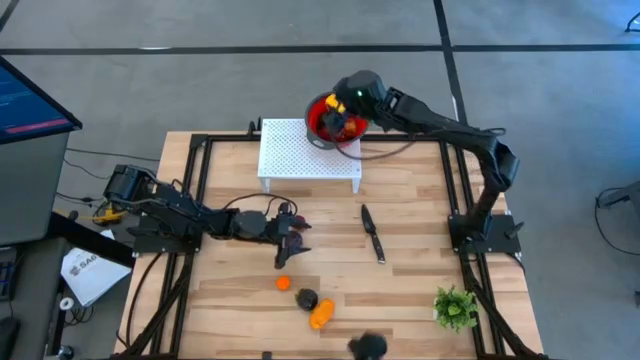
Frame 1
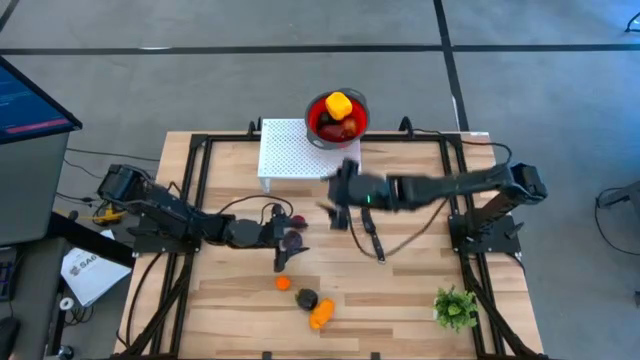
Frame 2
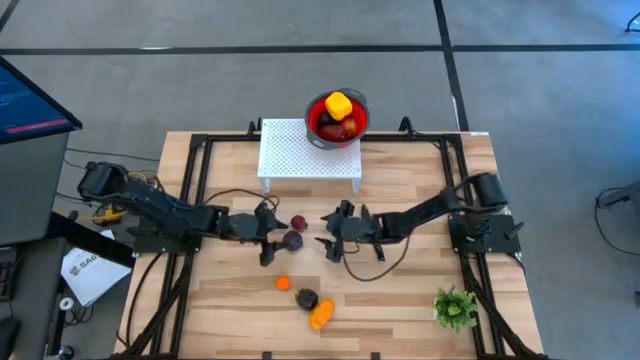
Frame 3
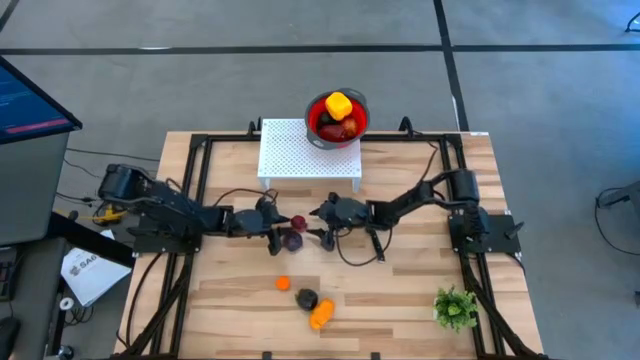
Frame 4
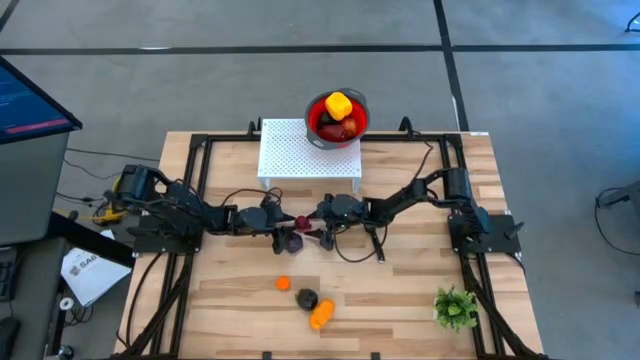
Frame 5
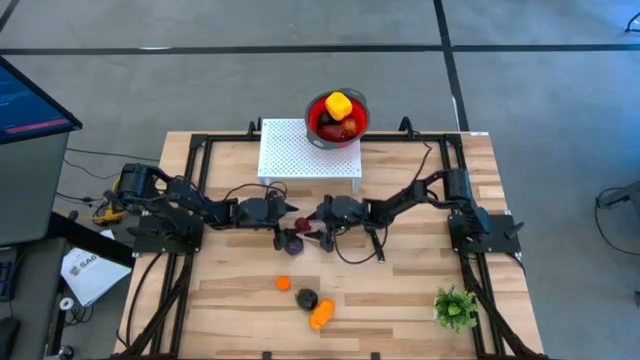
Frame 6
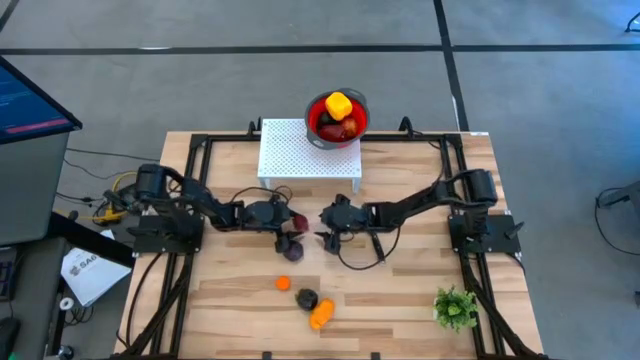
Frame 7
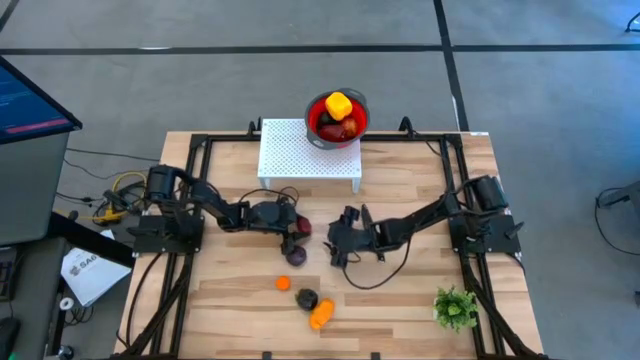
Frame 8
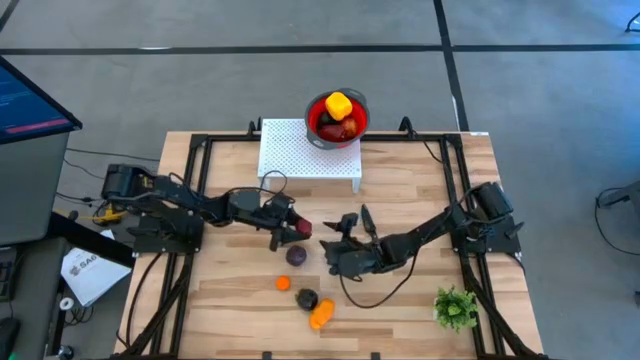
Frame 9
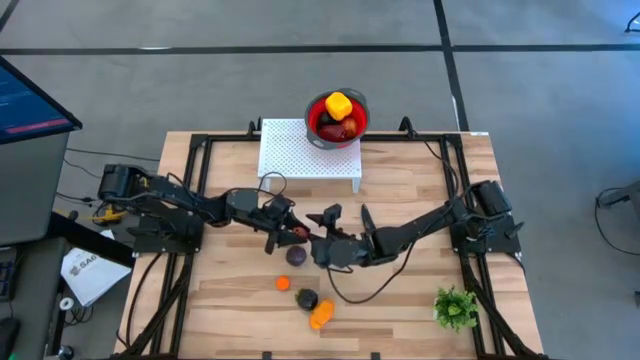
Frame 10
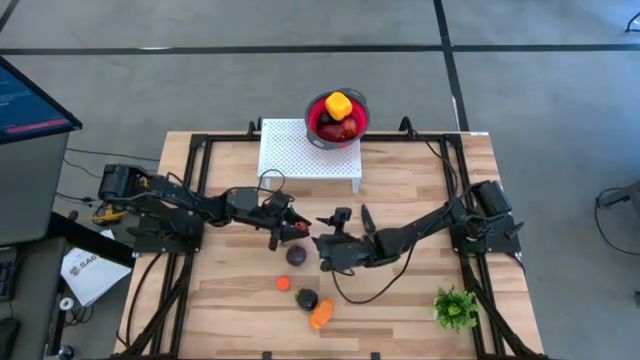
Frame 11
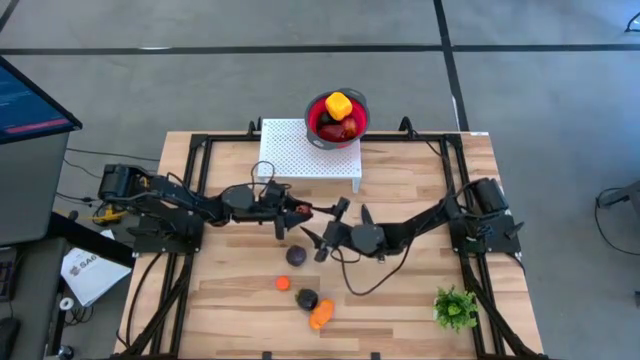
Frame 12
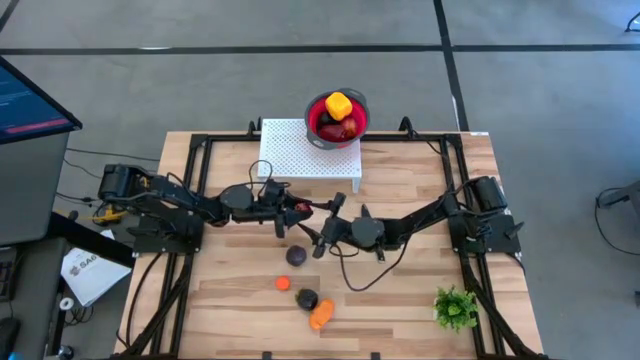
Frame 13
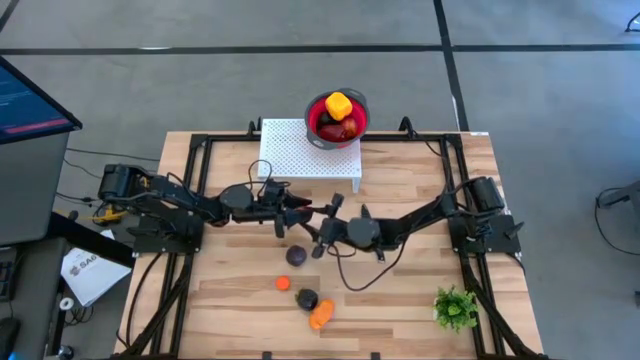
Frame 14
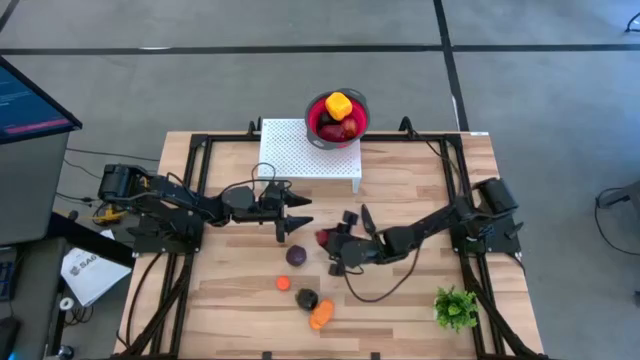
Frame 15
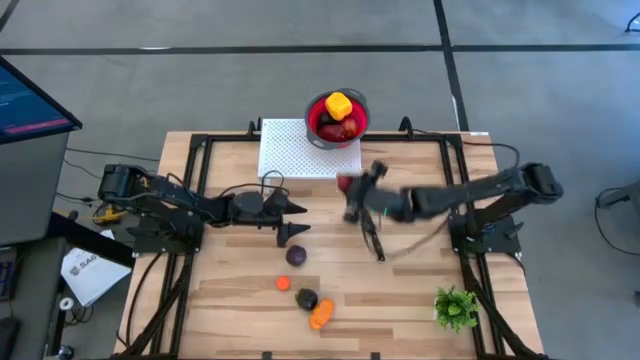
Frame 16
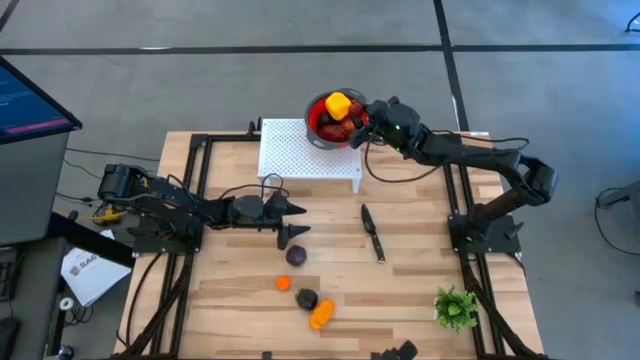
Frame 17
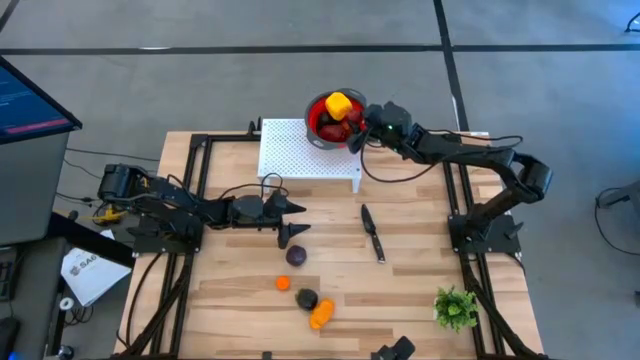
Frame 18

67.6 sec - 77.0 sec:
Task: Pick & Place Fruit
Put the red pomegranate into the strainer bowl on the shelf

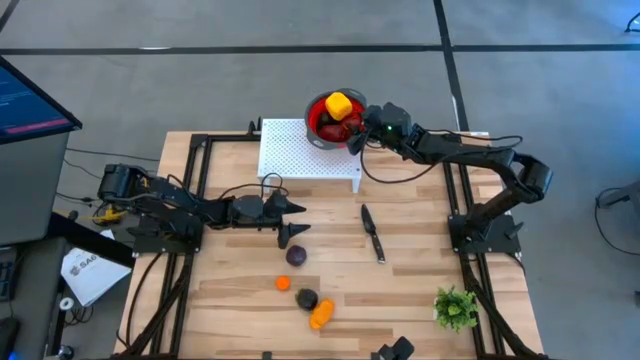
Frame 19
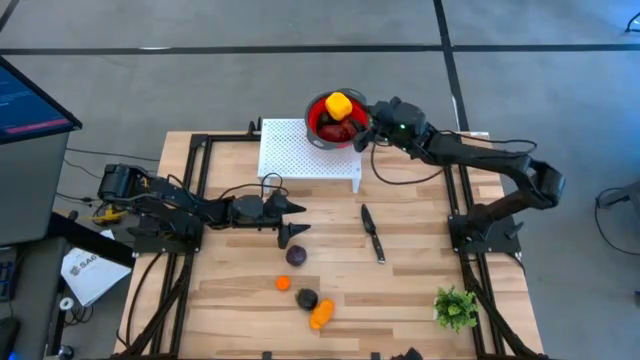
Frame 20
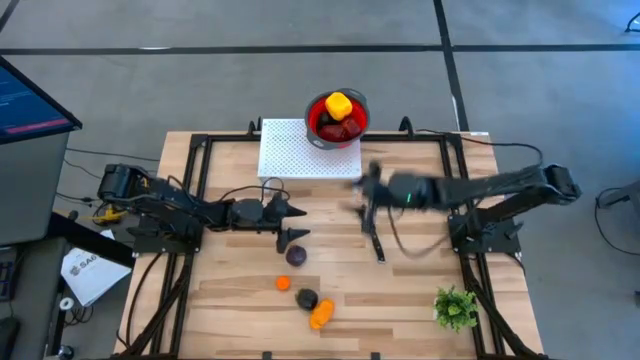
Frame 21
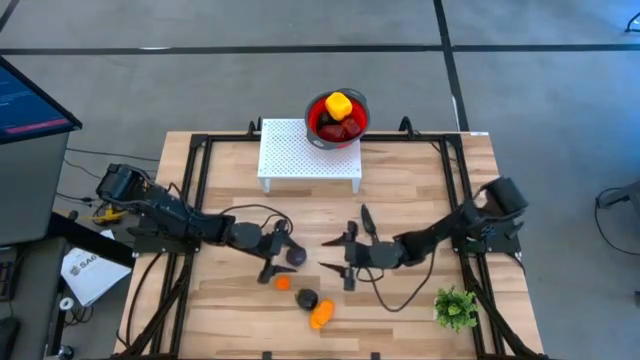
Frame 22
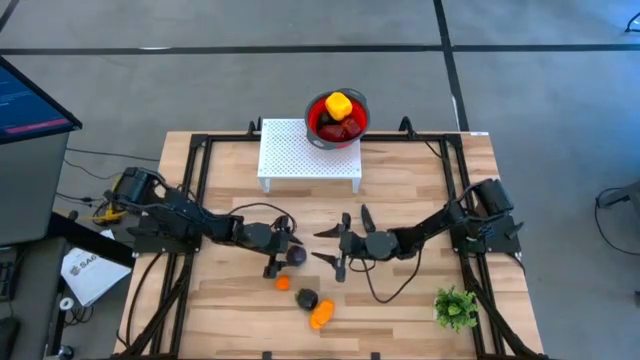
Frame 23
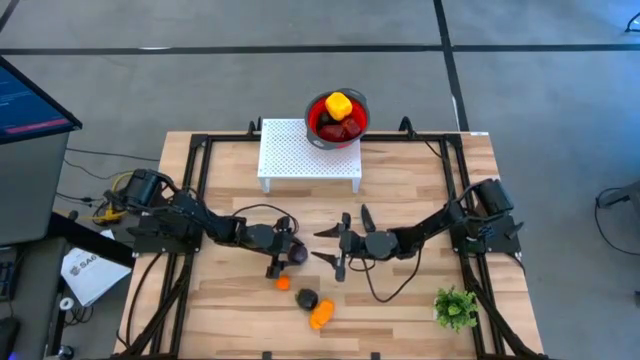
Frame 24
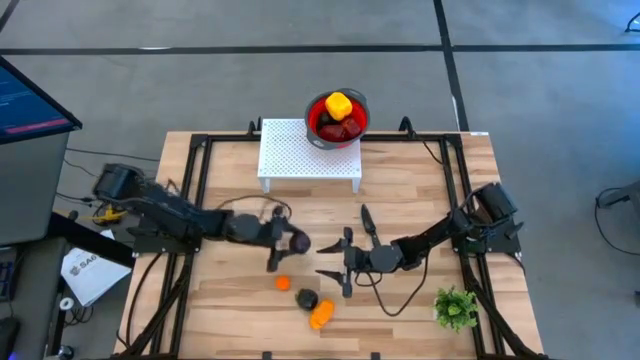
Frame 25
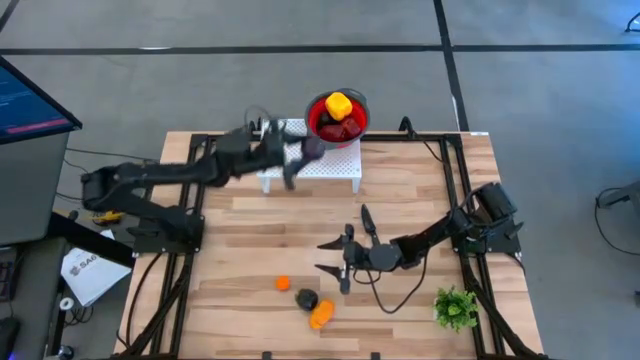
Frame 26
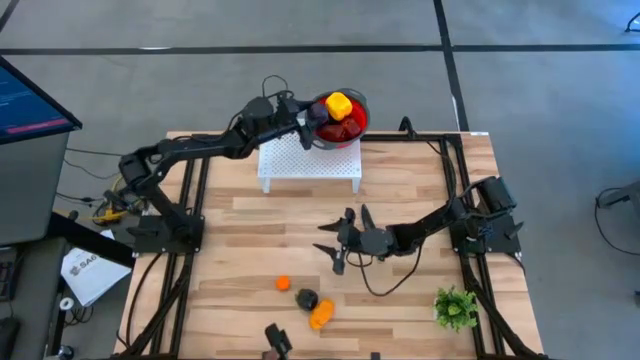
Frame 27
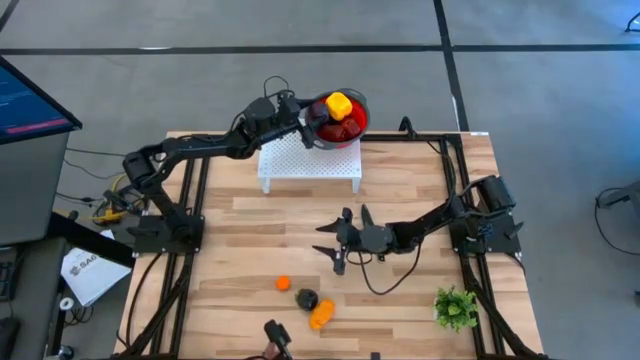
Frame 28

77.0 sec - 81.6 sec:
Put the black plum into the strainer bowl on the shelf

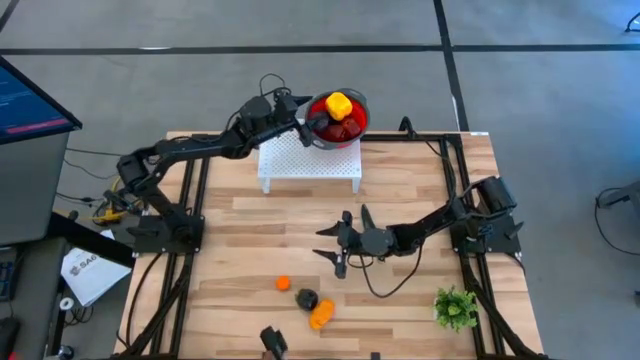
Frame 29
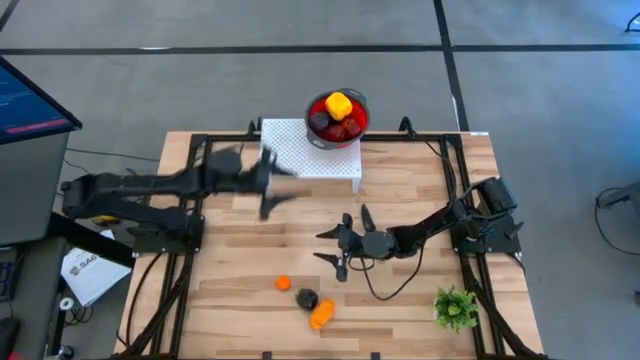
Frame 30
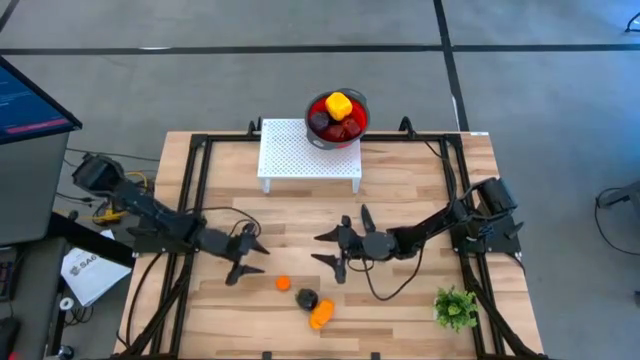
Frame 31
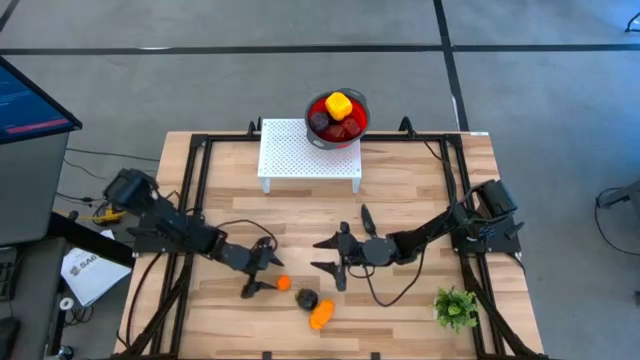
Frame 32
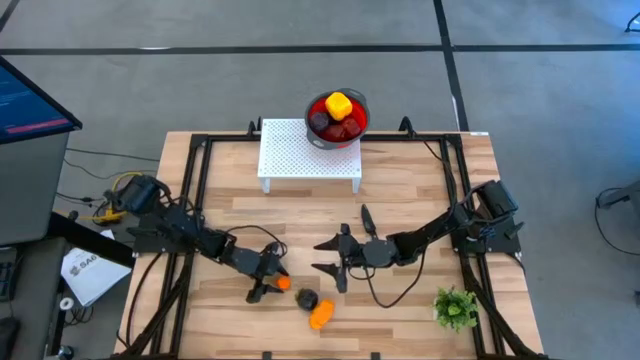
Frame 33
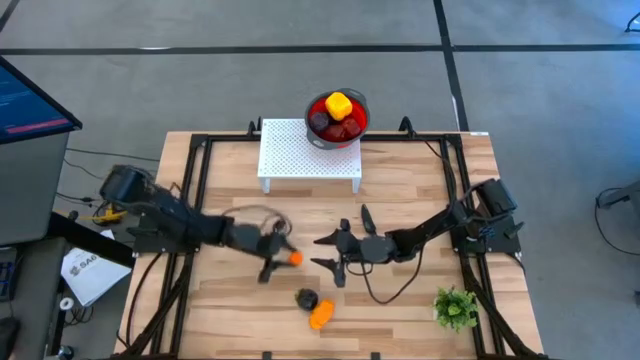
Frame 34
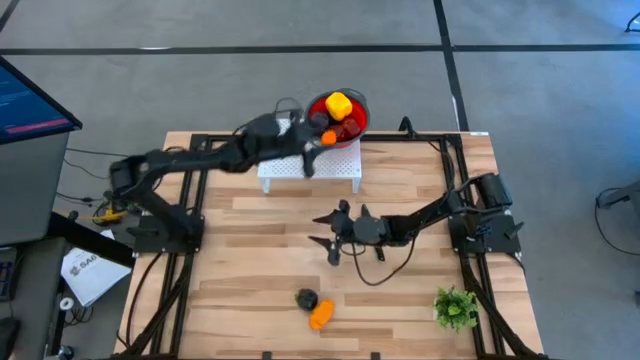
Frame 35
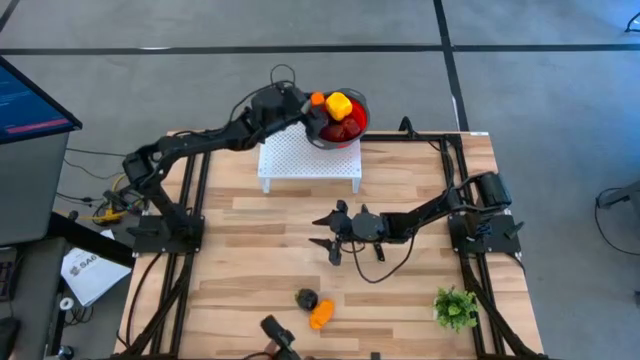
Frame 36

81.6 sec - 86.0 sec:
Put the orange tangerine into the strainer bowl on the shelf

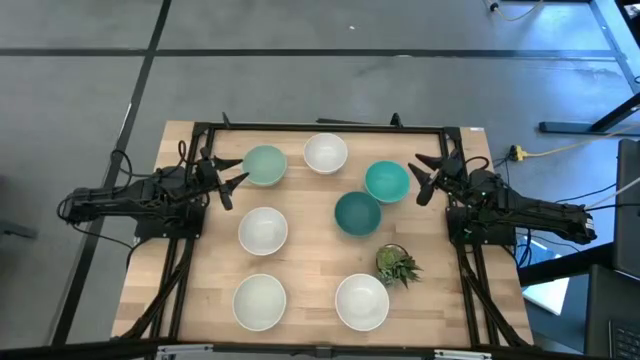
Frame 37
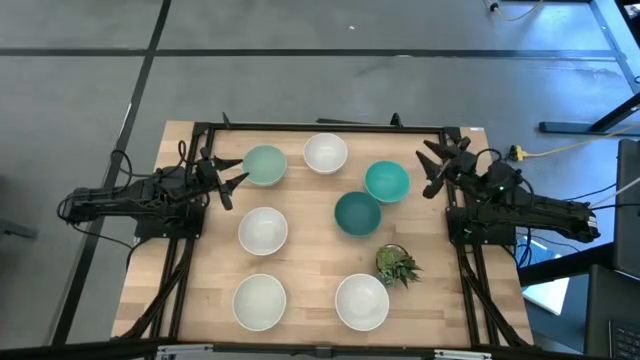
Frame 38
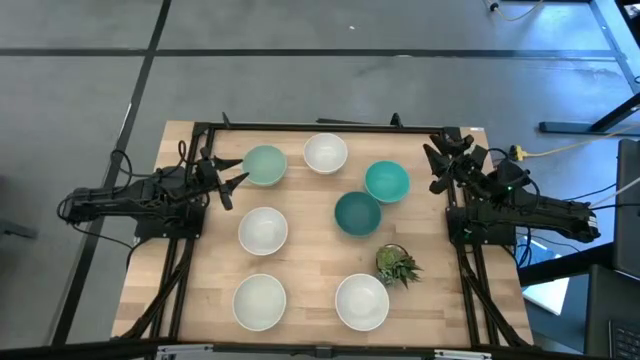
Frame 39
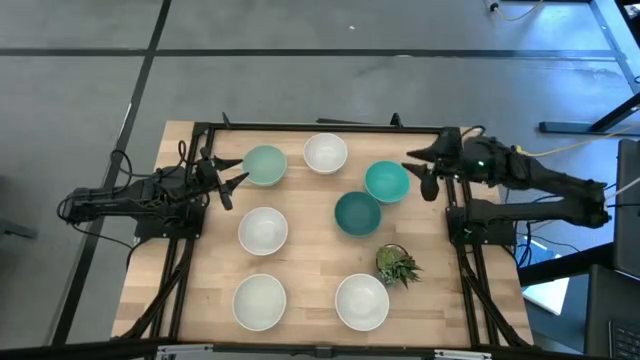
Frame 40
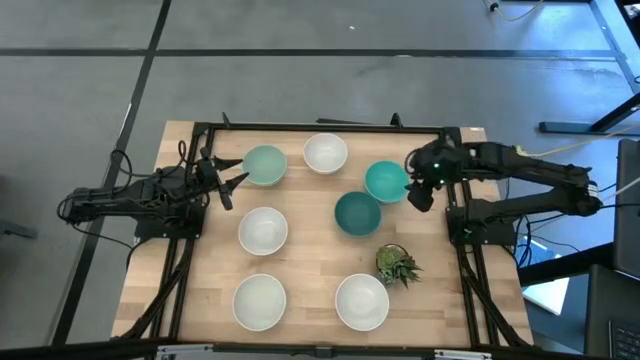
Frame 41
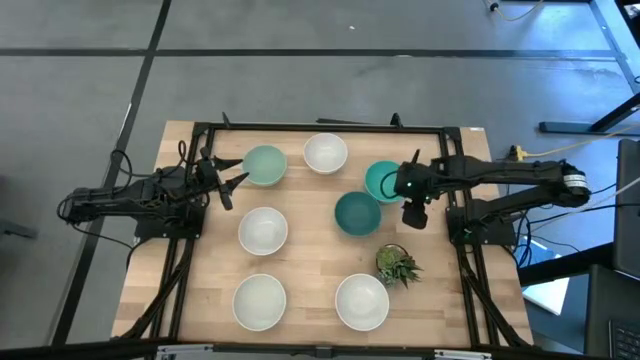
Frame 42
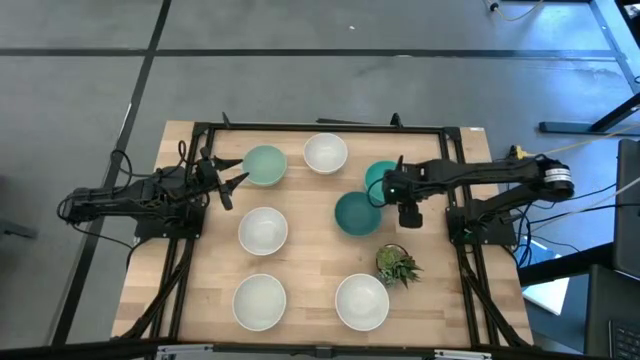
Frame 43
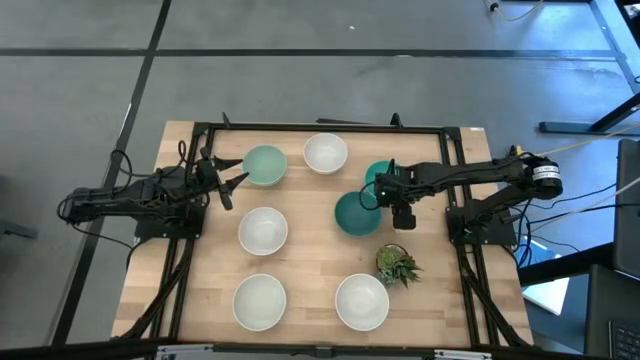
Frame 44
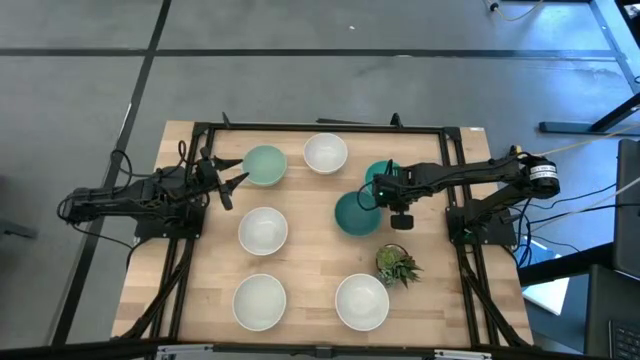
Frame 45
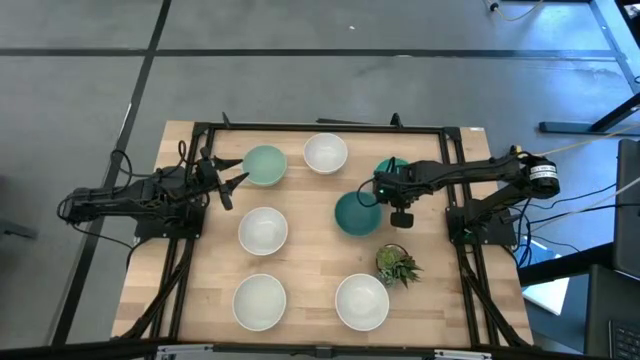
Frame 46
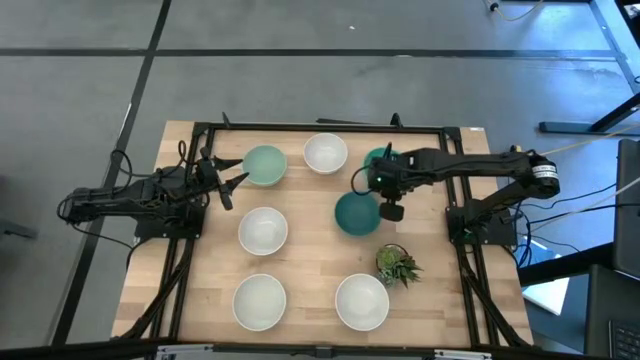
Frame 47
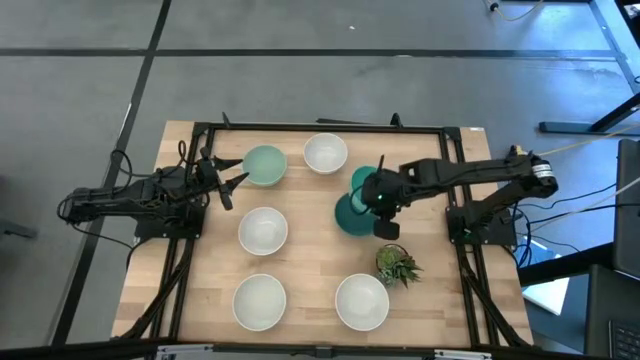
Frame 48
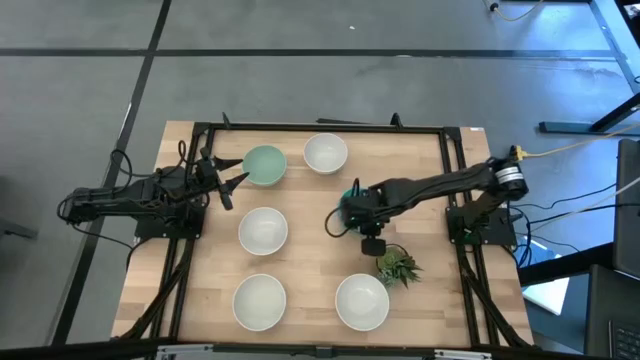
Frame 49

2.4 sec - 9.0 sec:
Task: Nest bowls inside each other
Stack the blue bowl on the dark green bowl
